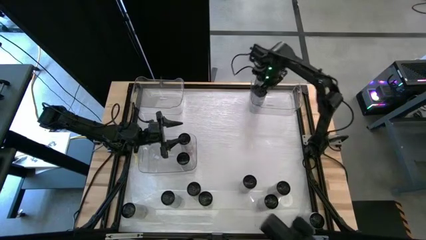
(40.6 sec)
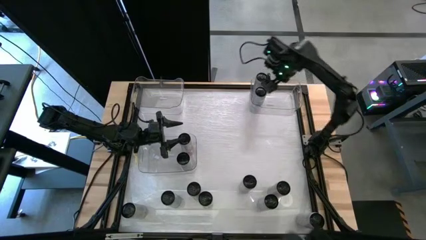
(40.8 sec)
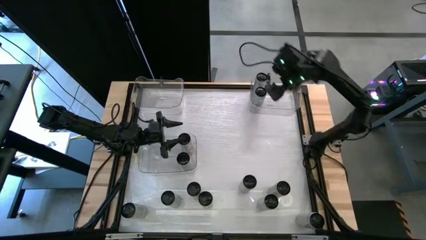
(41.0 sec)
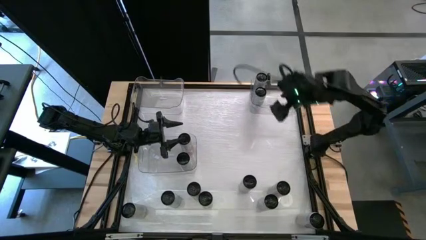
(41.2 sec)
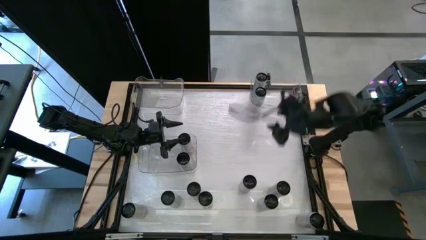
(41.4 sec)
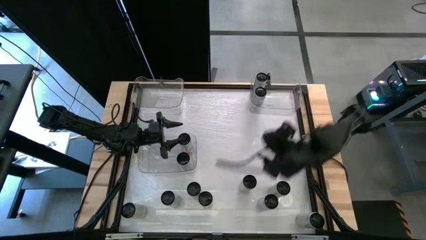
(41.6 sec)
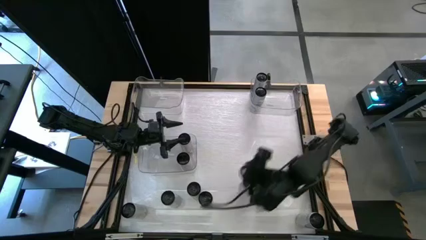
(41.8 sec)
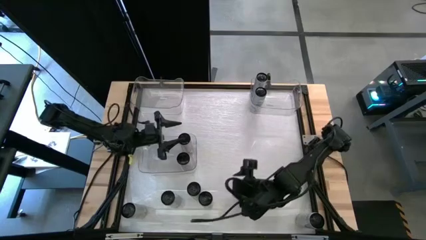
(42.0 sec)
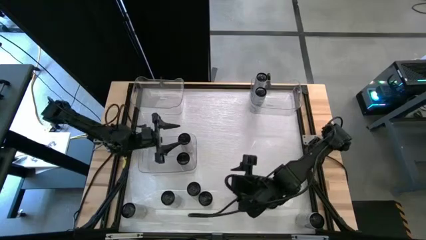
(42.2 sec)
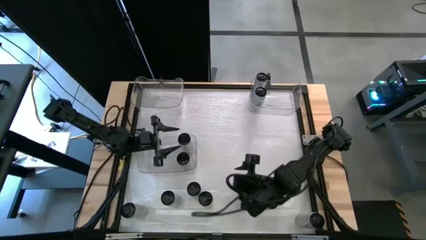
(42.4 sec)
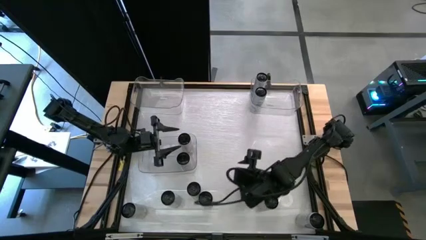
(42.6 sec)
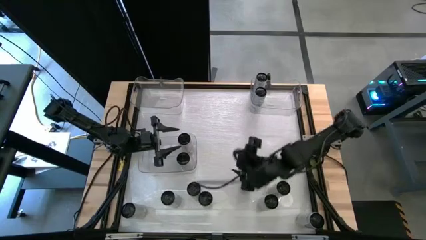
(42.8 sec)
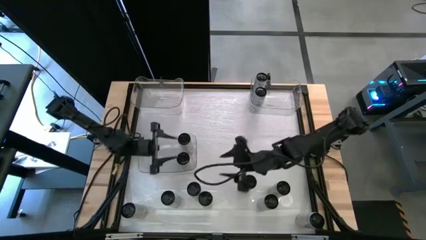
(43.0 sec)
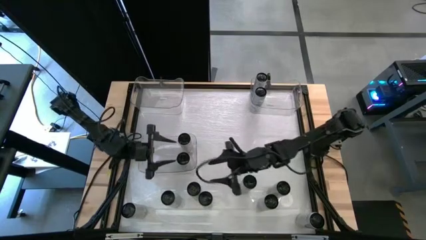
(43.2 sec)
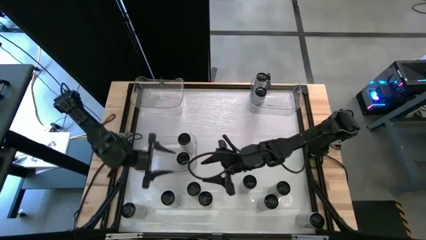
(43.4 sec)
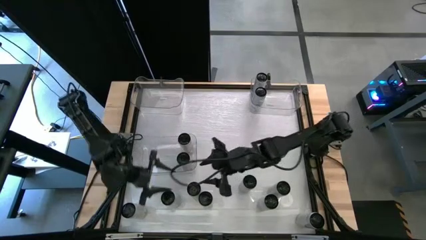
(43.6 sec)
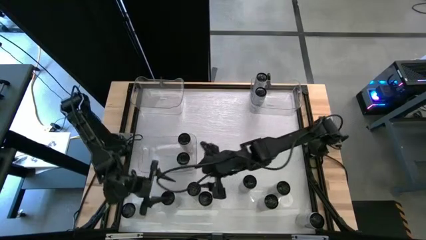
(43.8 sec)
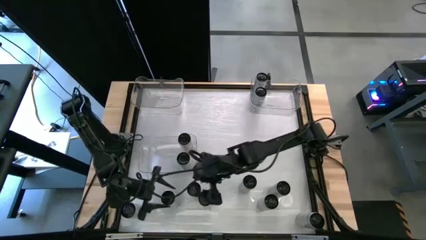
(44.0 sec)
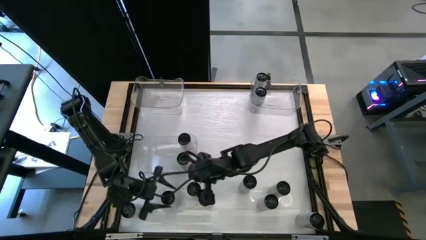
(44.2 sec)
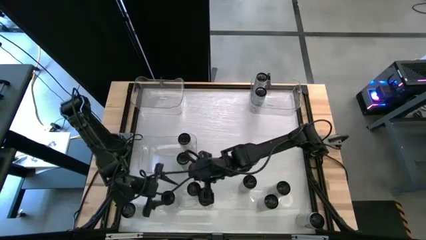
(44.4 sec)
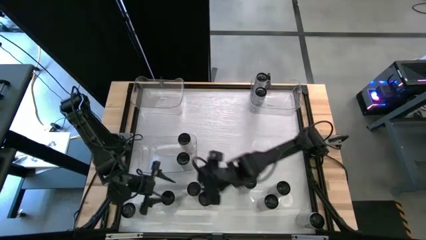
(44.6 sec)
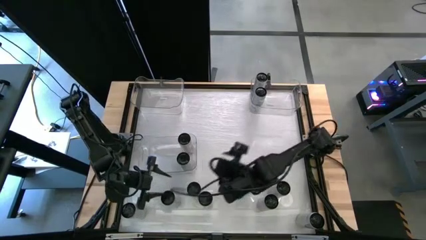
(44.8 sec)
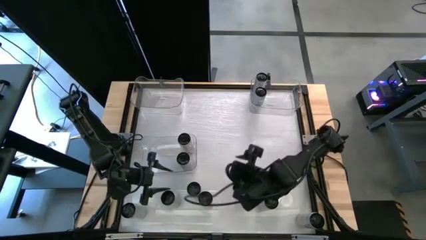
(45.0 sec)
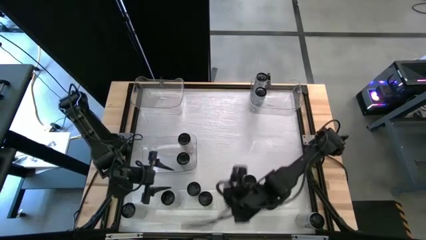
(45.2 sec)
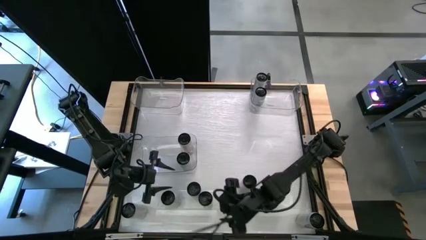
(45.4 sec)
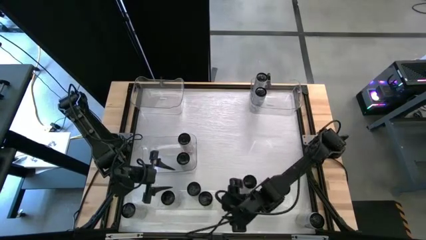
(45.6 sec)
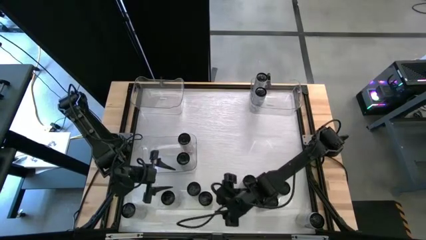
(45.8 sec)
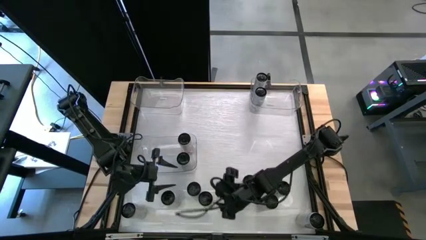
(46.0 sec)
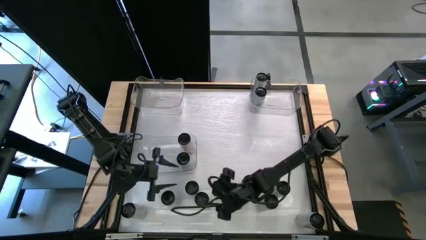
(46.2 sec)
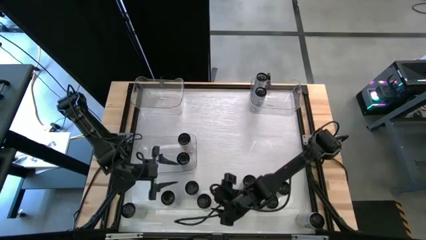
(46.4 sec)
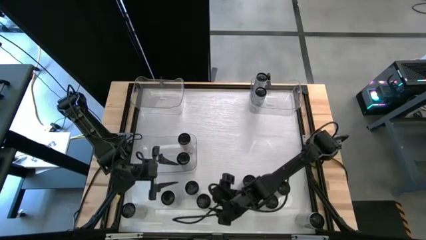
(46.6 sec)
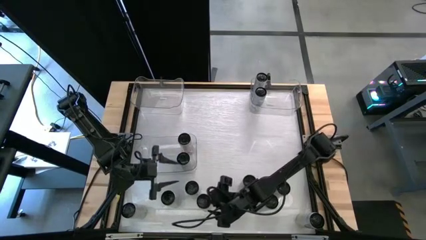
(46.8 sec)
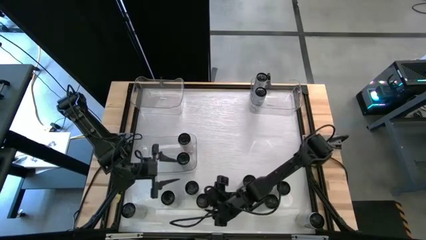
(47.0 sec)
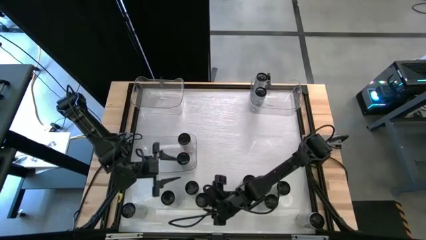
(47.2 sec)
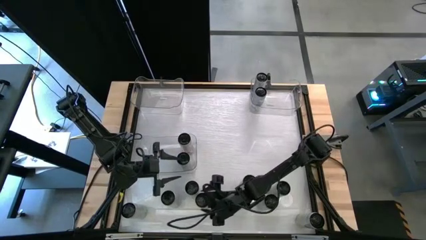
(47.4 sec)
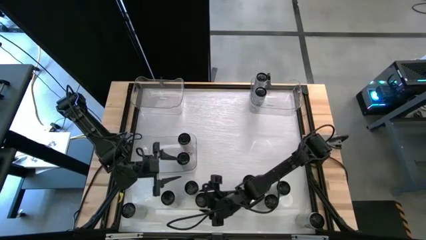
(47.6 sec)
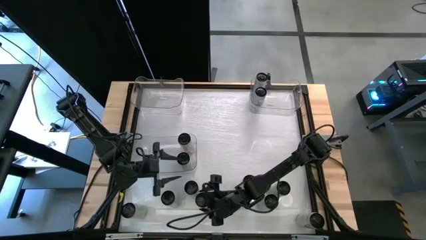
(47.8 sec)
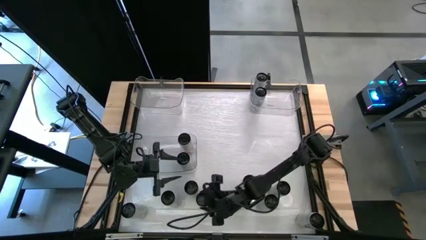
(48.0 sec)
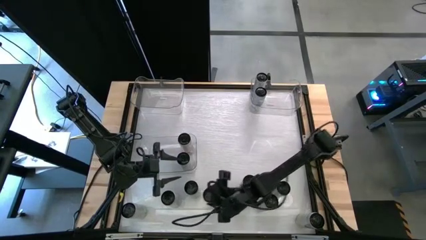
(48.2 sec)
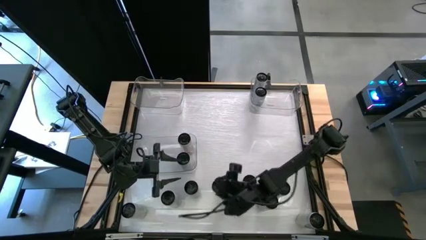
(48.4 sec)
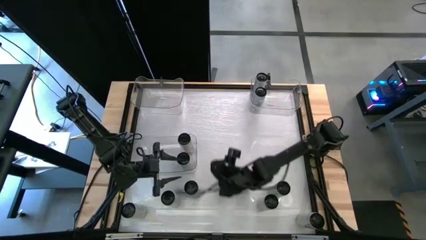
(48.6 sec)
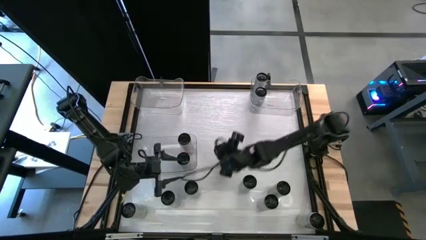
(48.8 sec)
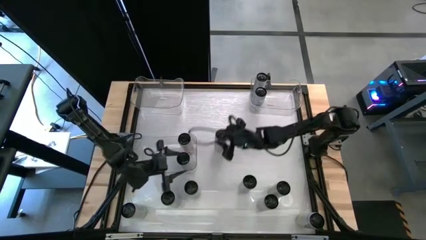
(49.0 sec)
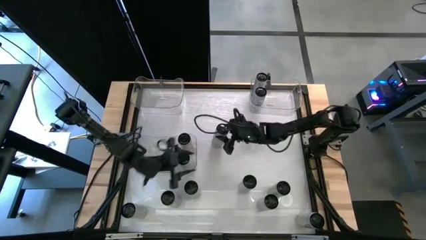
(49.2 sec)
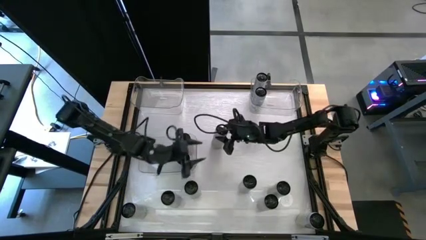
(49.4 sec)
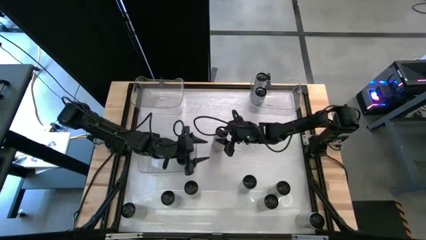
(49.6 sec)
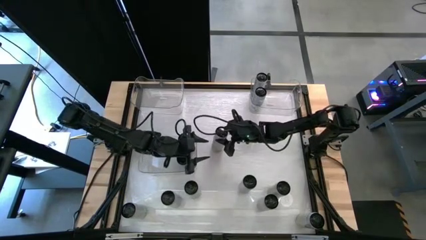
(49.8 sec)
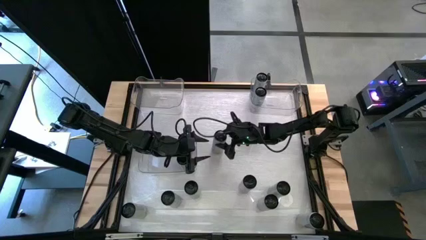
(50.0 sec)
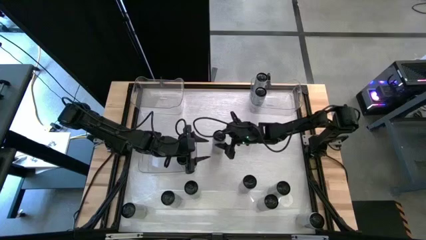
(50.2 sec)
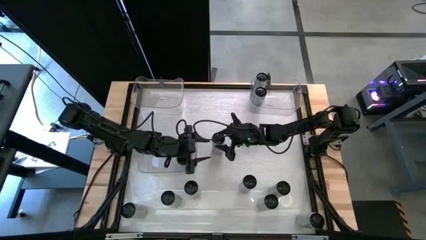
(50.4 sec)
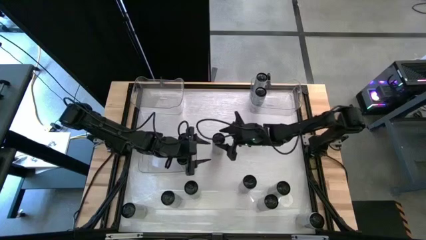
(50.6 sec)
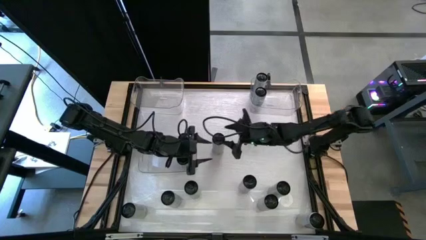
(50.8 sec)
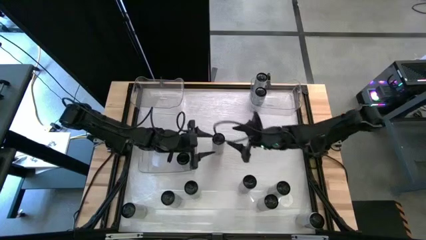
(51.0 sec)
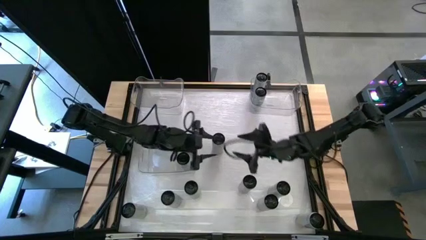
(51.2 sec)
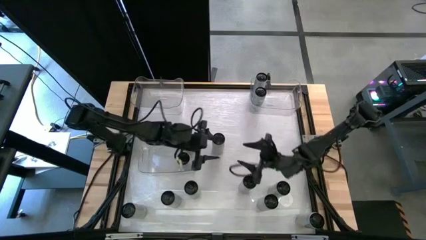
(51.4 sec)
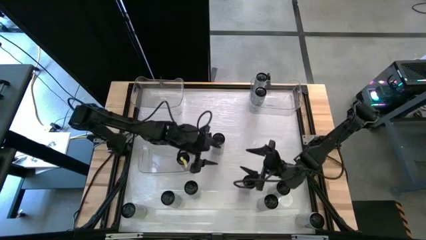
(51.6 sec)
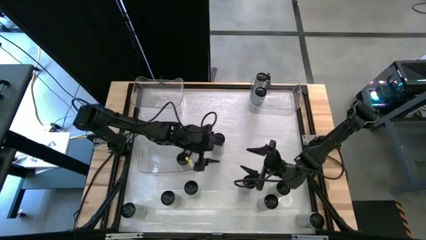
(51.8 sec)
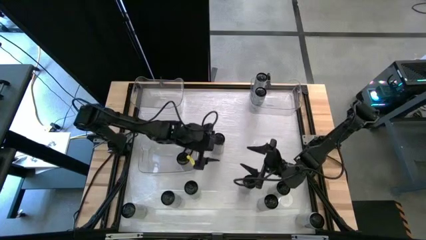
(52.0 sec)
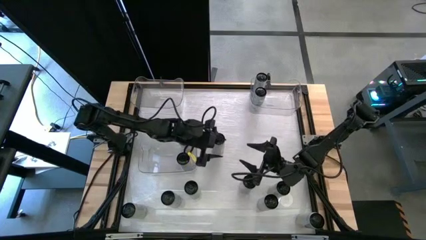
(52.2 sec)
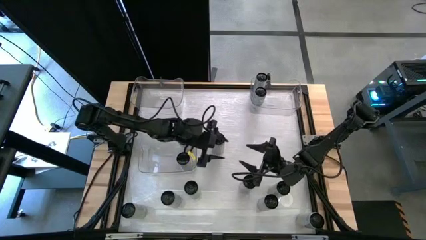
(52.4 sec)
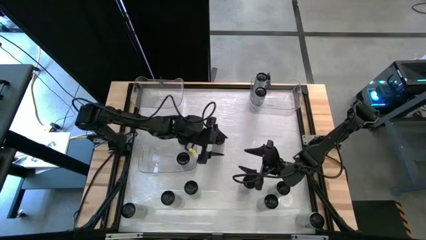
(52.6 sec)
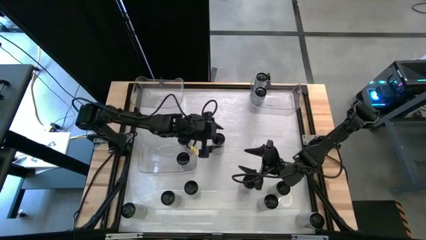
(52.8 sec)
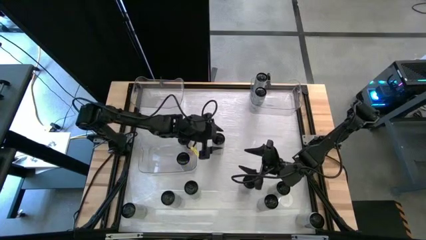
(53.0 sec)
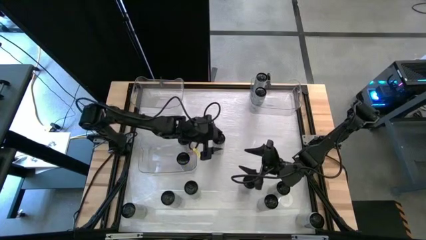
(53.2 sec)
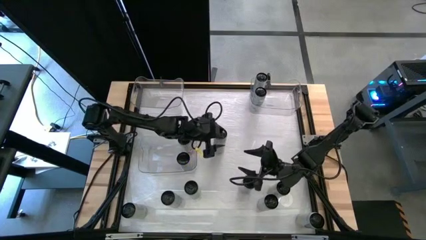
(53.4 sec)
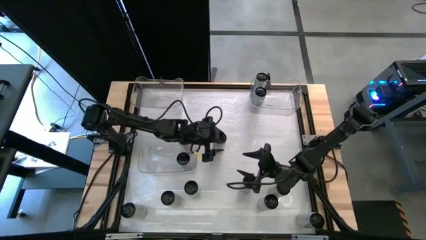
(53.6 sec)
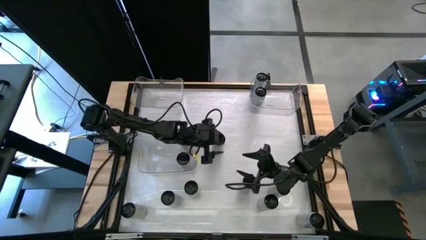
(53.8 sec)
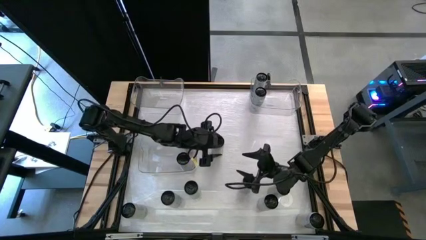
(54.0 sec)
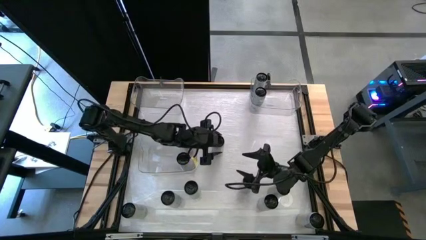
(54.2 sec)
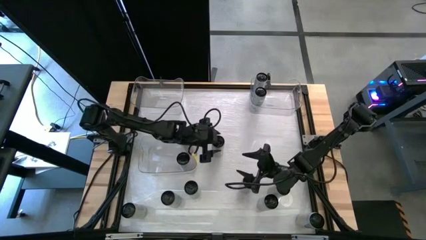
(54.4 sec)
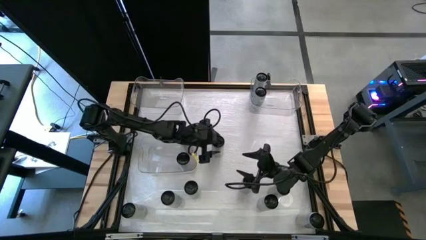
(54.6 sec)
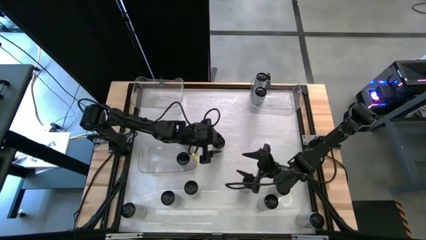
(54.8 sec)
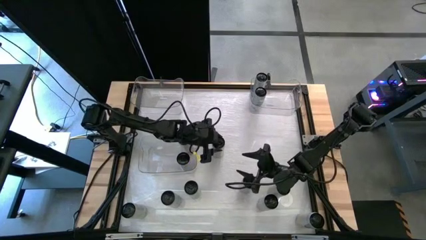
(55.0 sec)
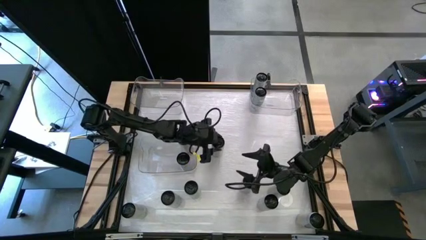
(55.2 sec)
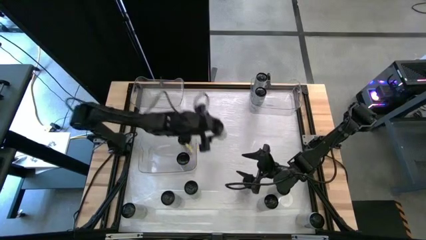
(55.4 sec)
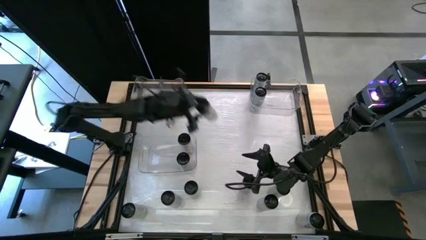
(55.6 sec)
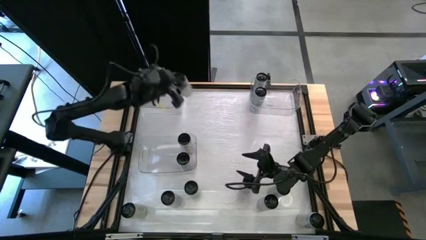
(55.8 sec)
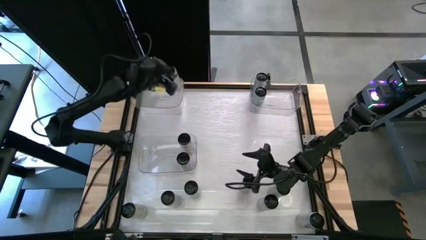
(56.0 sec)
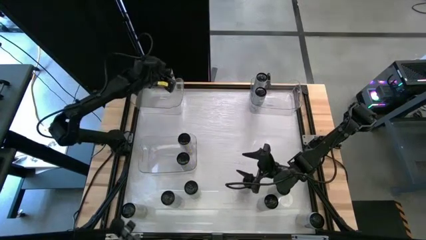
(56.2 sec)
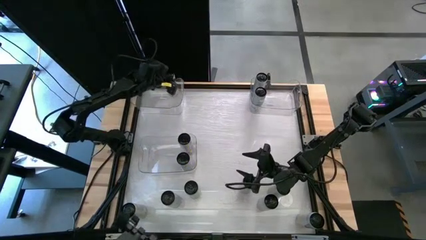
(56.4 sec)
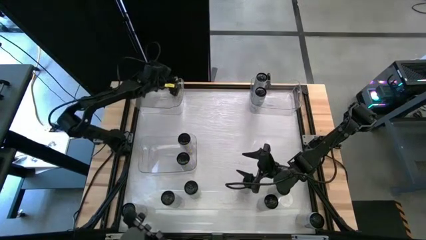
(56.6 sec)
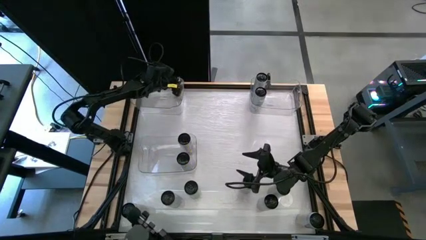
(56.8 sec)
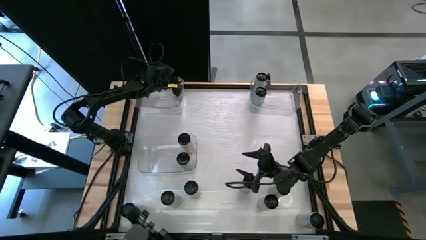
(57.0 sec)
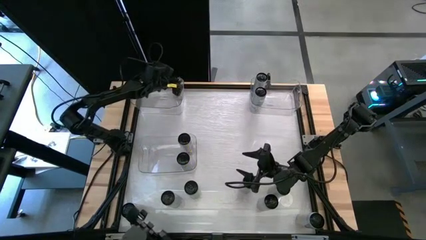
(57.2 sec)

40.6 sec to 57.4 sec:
Task: Sort soda cans
Put the white-yellow can into the top left transparent bin
